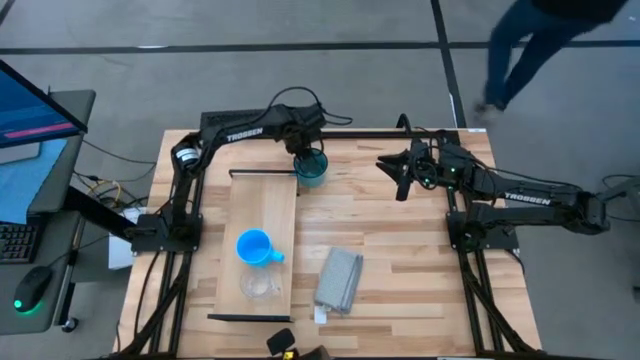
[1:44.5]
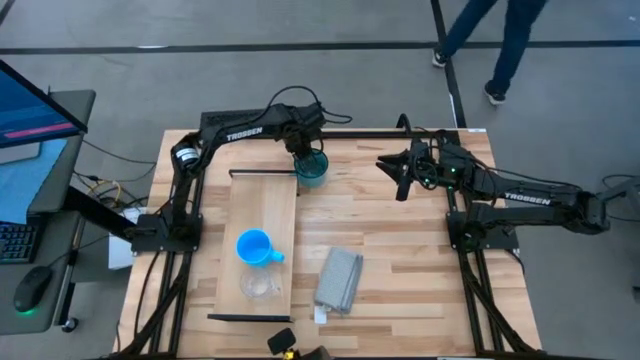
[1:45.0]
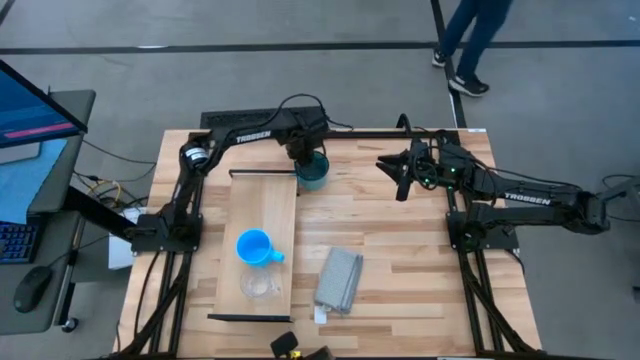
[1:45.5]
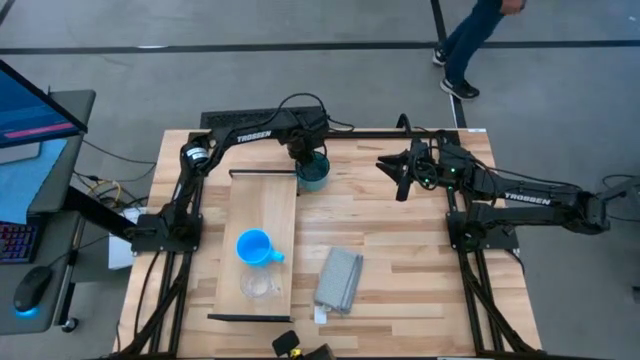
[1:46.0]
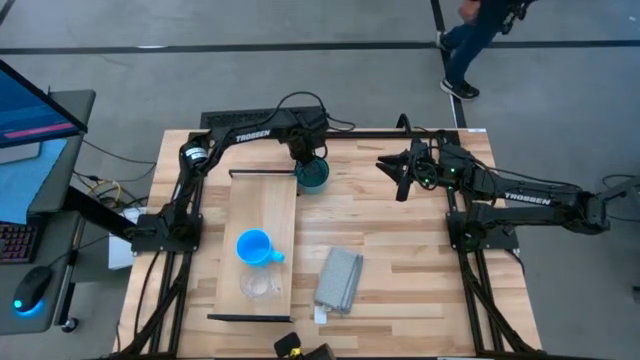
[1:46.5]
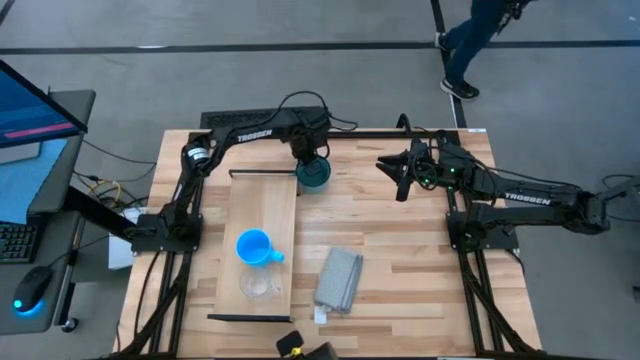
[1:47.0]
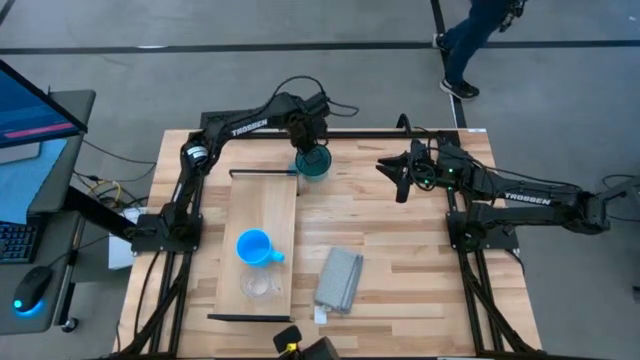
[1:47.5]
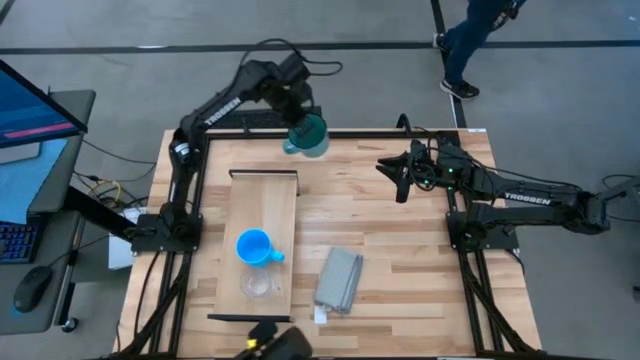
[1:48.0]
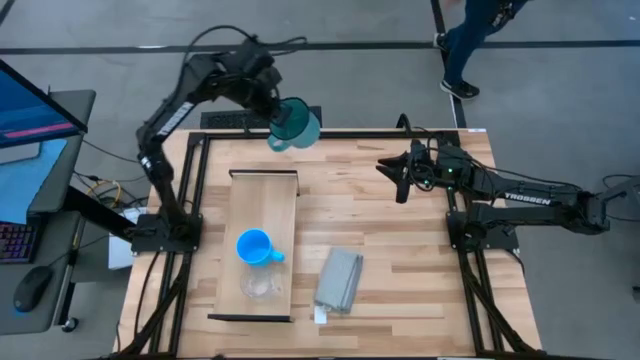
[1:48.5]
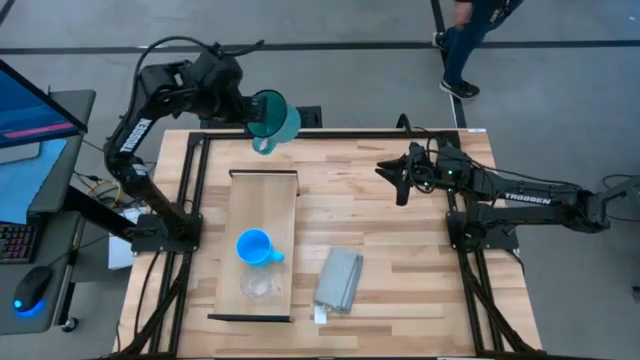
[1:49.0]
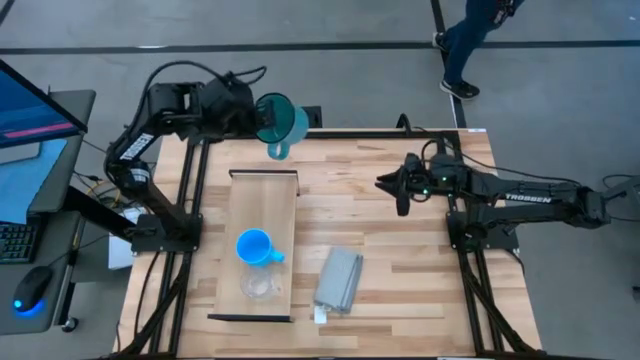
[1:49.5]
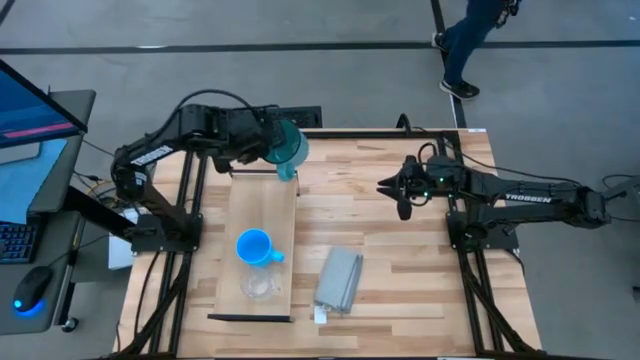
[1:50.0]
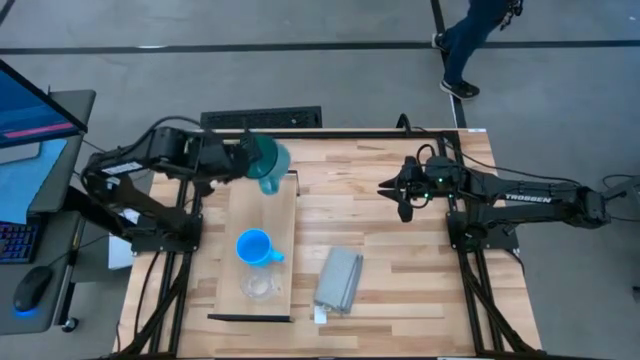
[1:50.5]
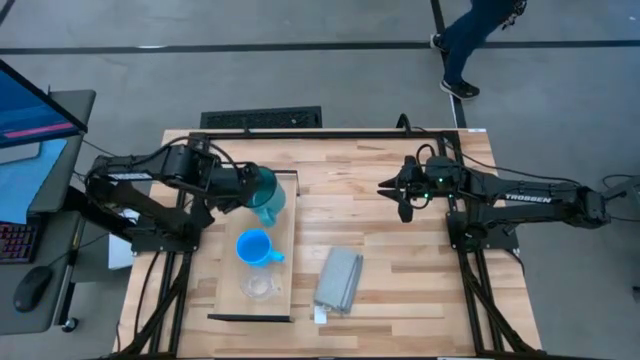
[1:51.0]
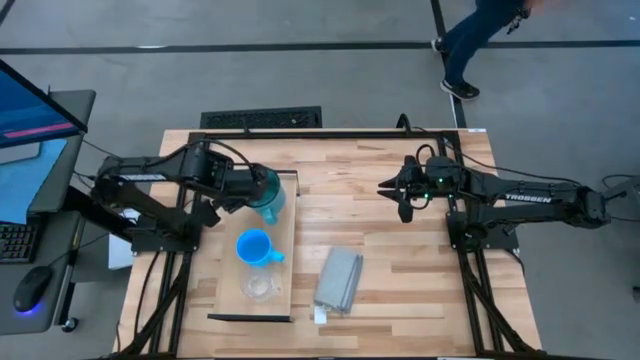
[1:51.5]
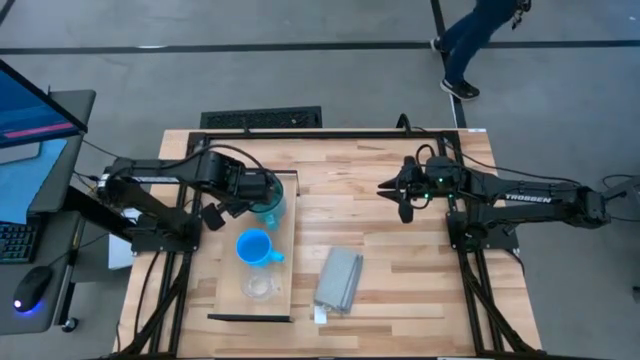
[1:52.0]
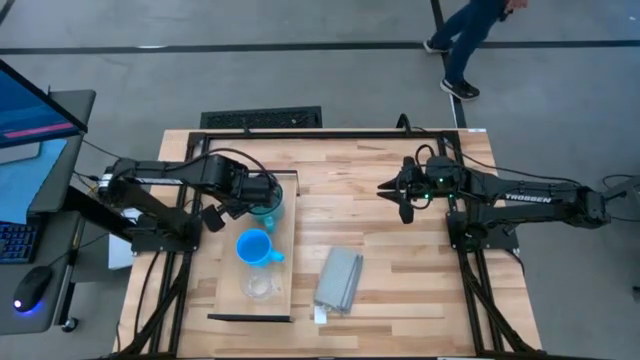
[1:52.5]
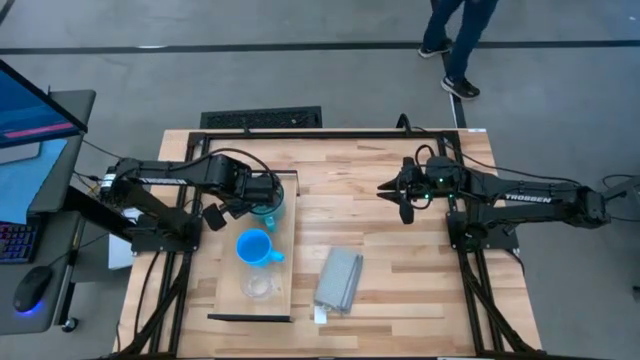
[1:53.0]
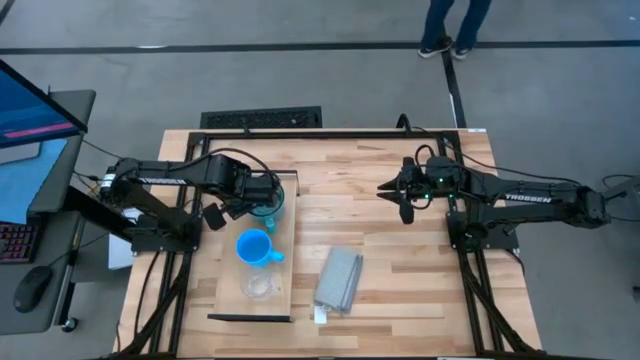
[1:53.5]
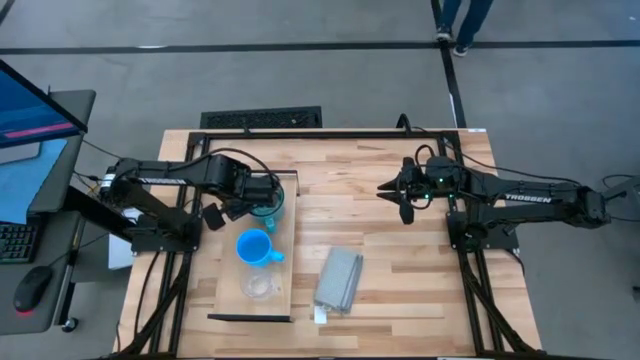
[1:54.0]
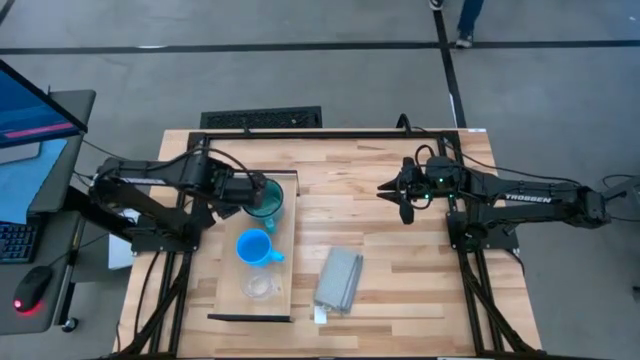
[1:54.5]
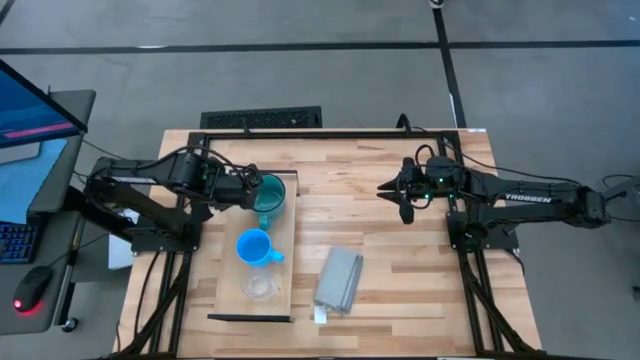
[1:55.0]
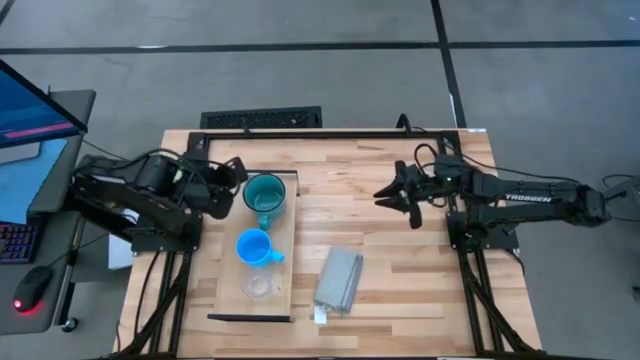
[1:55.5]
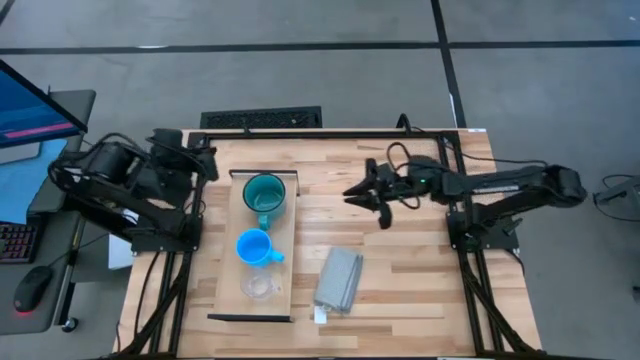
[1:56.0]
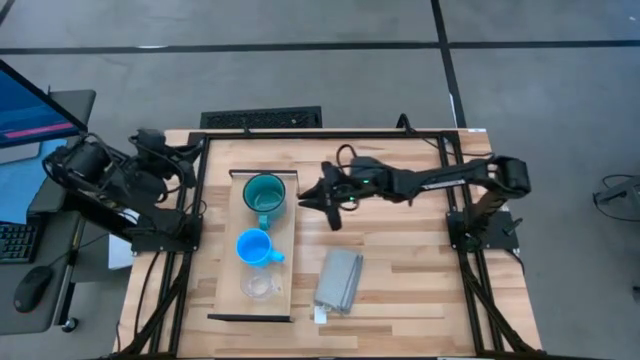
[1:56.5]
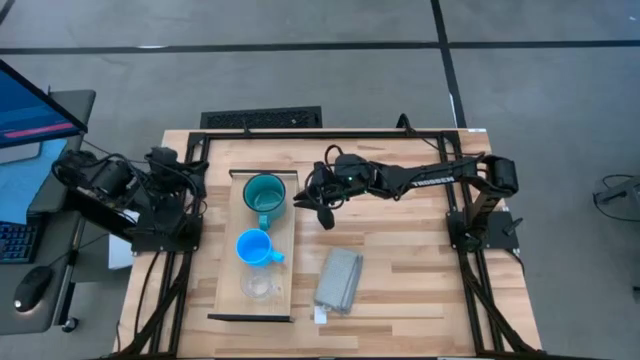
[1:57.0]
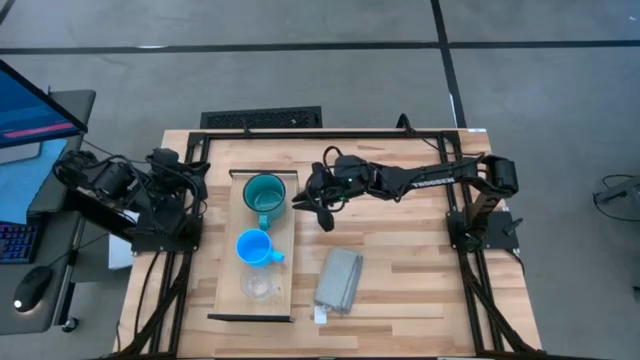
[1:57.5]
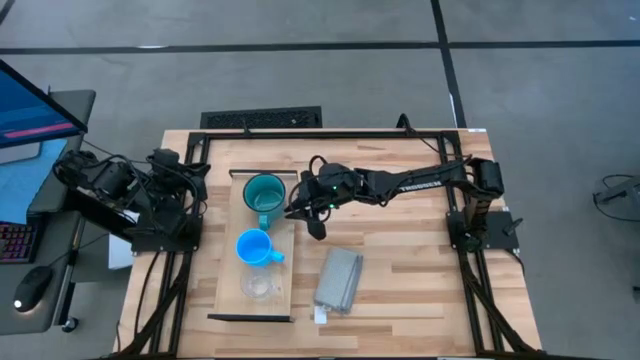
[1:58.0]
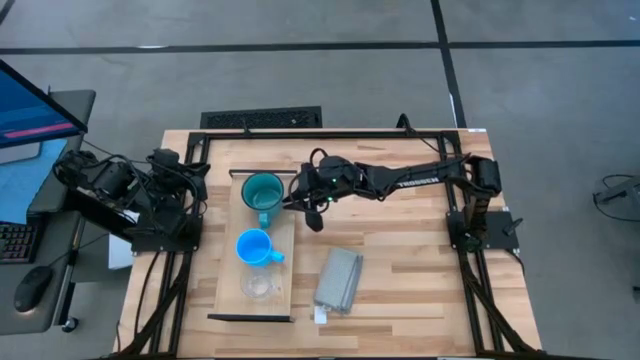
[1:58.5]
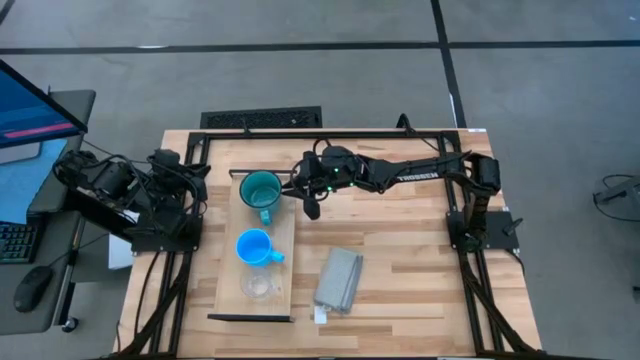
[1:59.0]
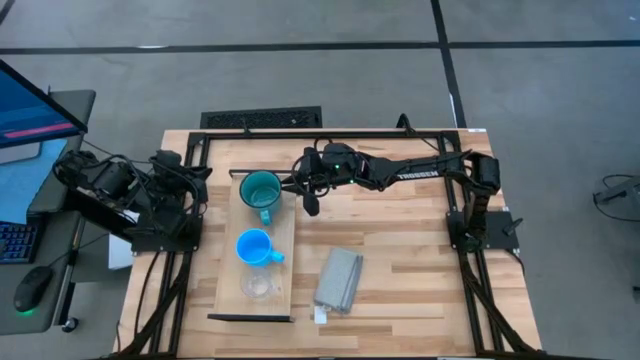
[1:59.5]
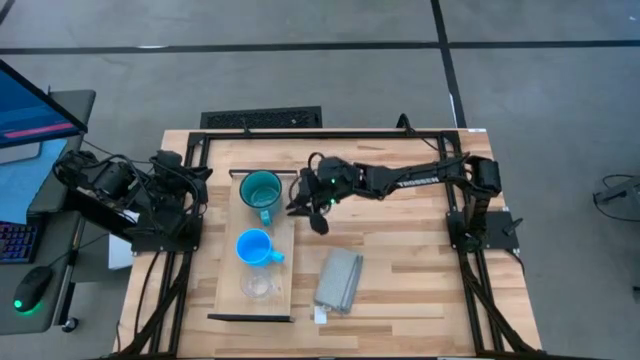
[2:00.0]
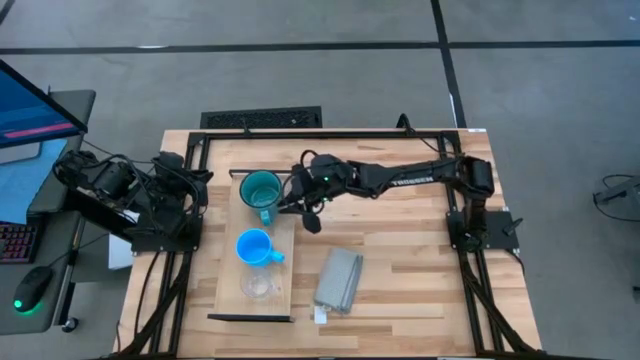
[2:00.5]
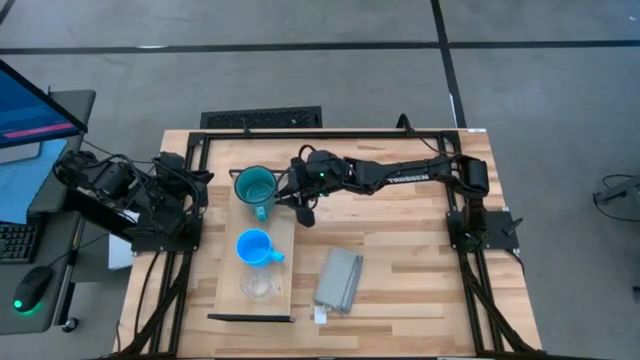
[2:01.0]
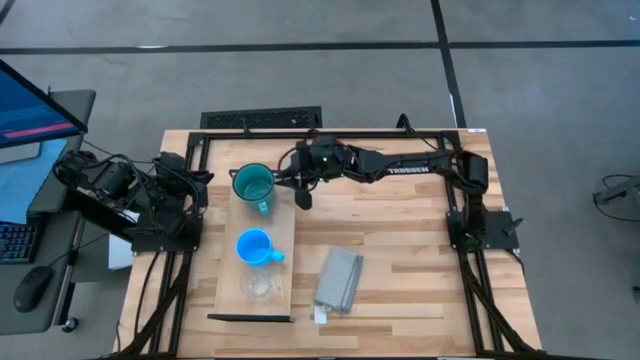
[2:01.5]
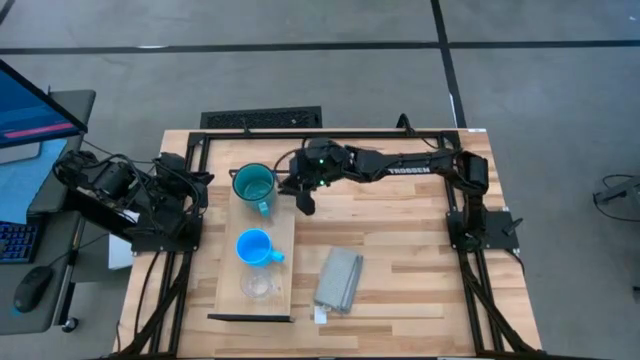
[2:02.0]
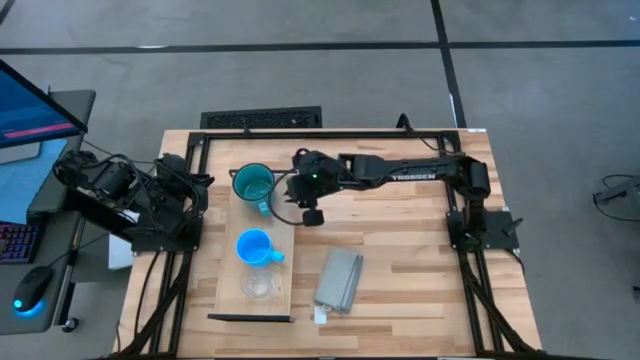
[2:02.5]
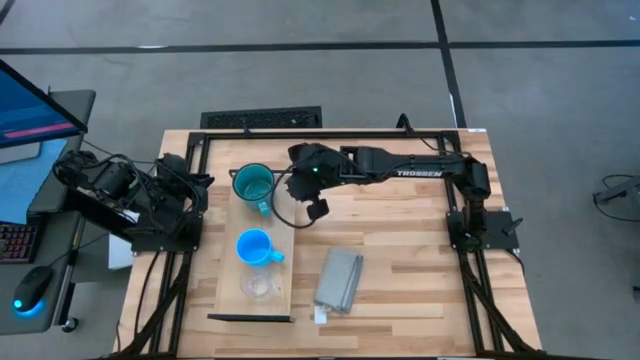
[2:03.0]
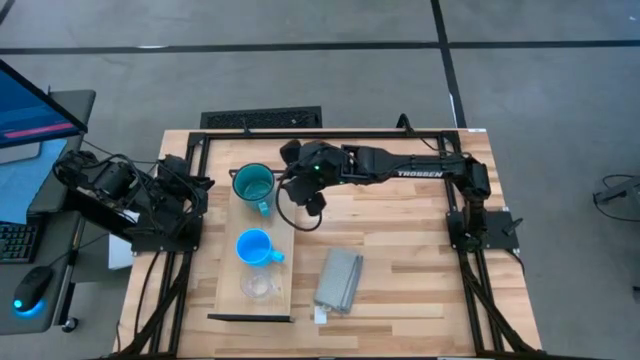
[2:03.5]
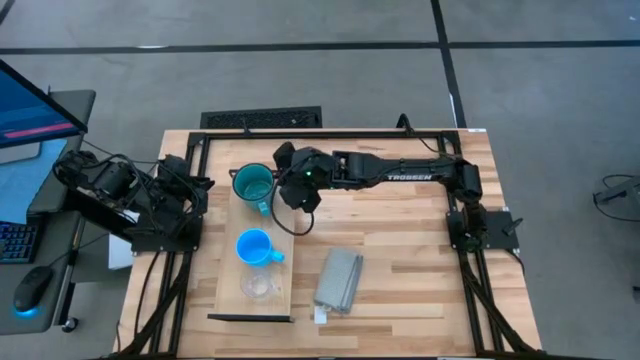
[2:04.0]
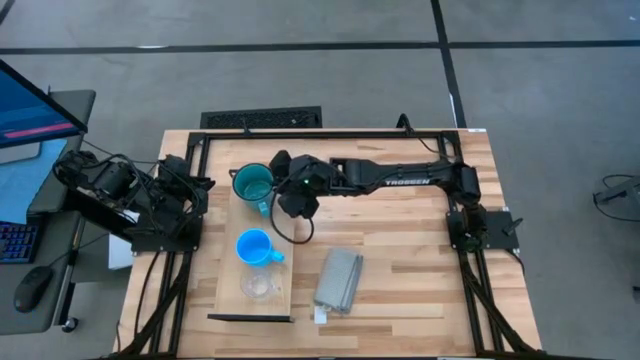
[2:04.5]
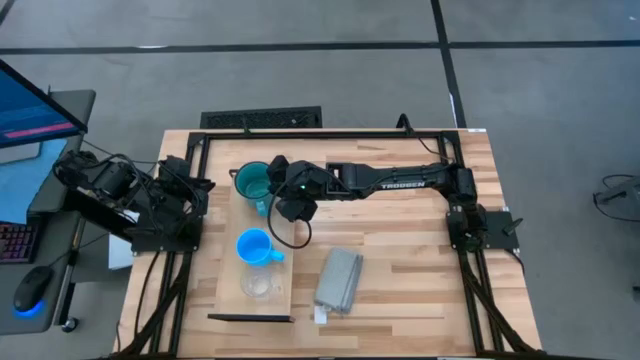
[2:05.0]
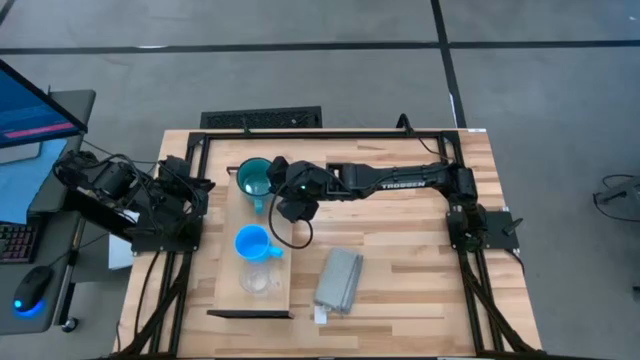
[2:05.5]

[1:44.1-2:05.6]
Task: Stack small to large cups/mugs on shelf
Put the blue mug on the shelf
